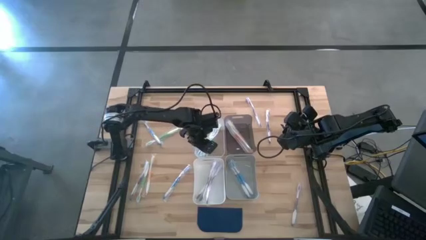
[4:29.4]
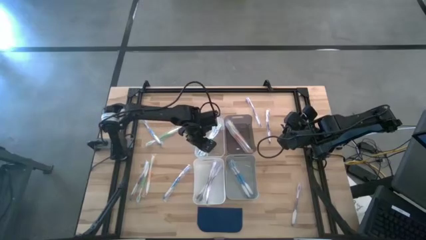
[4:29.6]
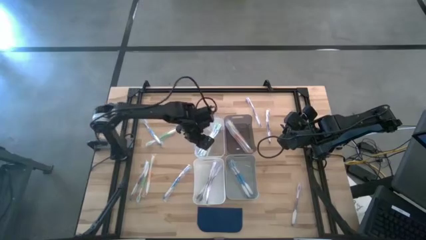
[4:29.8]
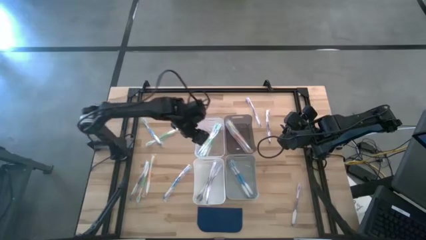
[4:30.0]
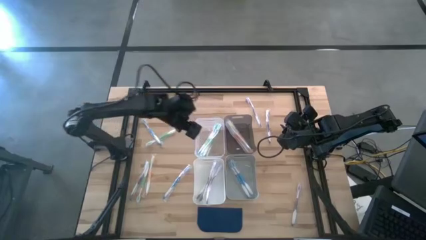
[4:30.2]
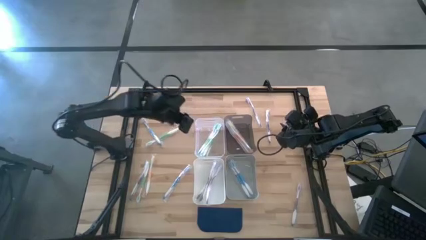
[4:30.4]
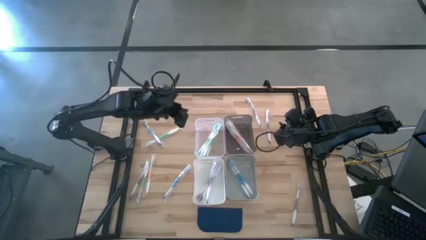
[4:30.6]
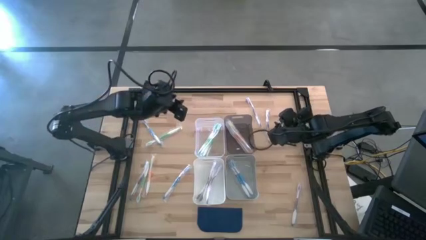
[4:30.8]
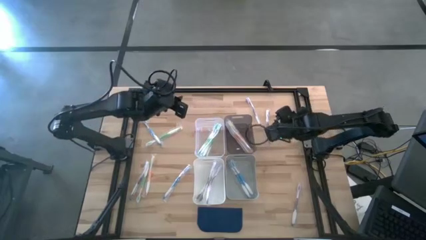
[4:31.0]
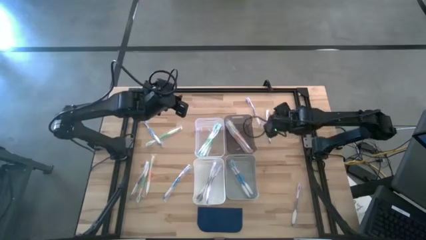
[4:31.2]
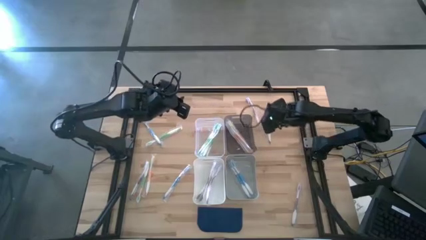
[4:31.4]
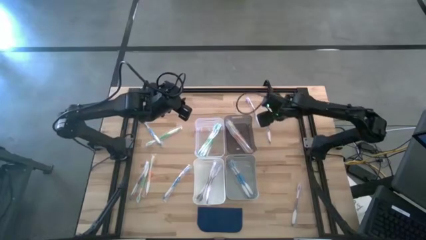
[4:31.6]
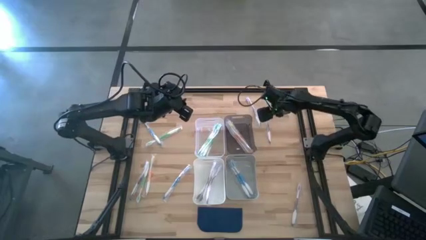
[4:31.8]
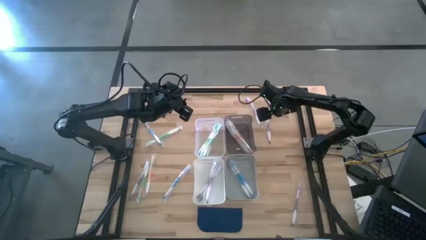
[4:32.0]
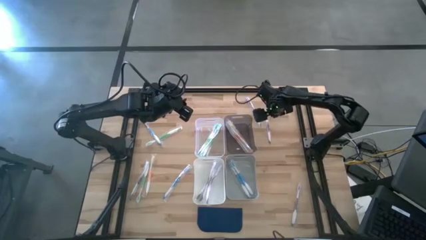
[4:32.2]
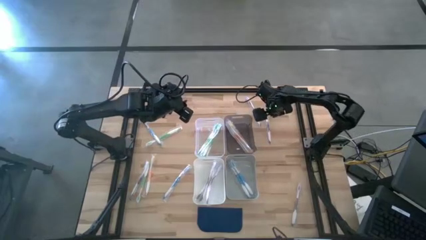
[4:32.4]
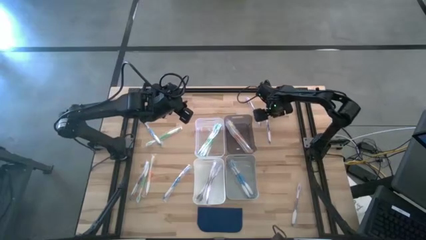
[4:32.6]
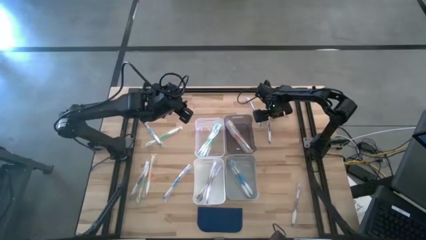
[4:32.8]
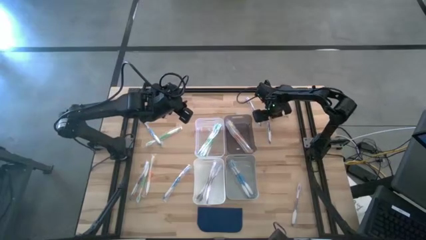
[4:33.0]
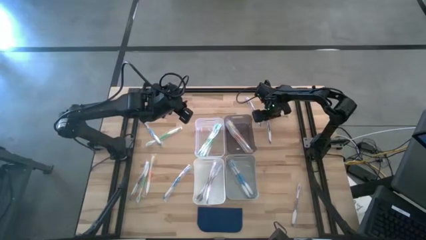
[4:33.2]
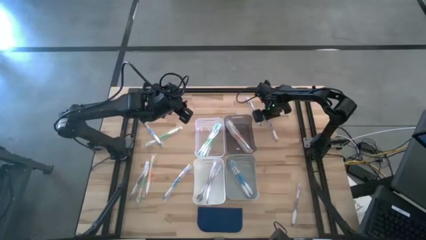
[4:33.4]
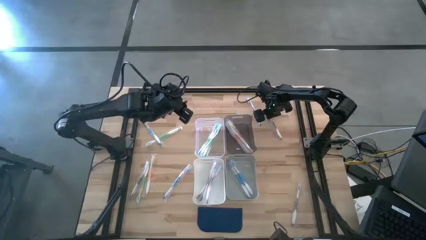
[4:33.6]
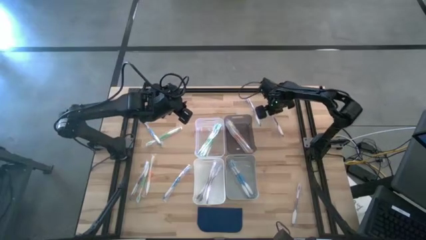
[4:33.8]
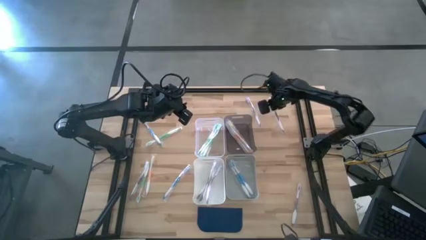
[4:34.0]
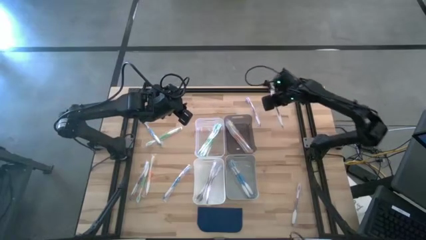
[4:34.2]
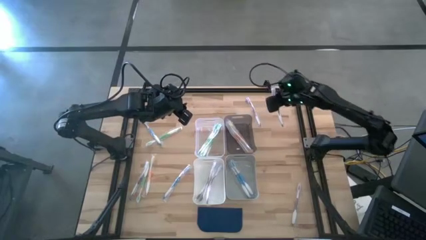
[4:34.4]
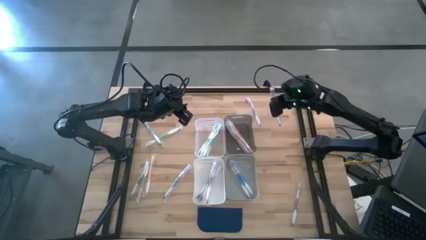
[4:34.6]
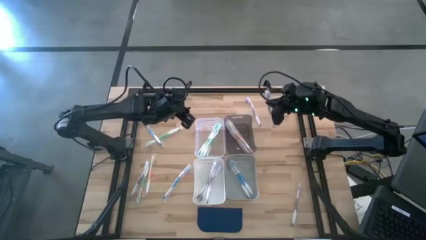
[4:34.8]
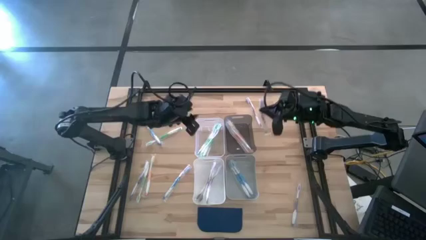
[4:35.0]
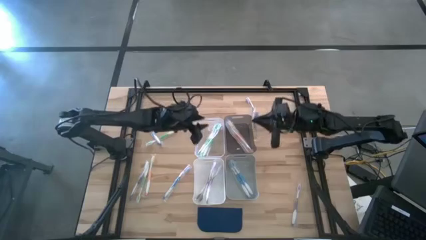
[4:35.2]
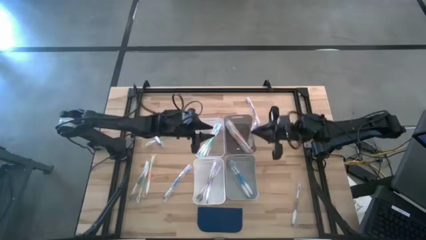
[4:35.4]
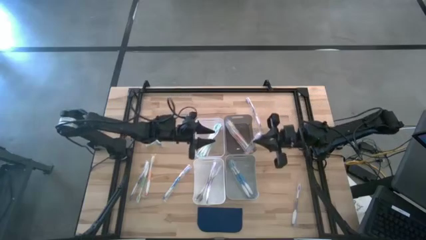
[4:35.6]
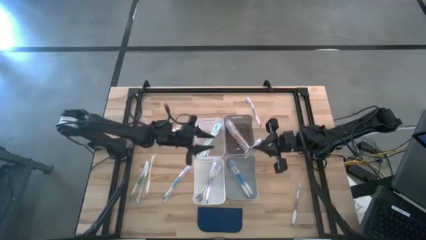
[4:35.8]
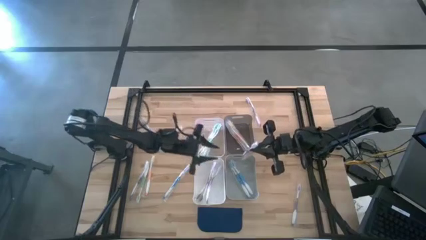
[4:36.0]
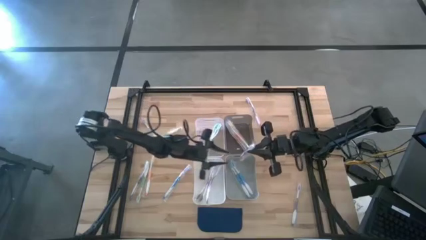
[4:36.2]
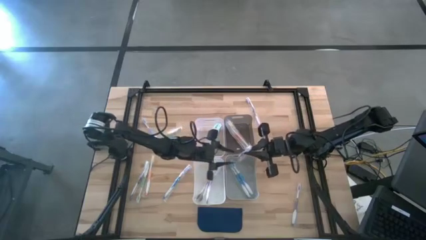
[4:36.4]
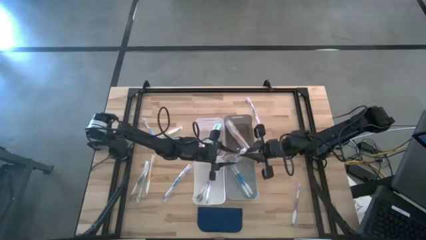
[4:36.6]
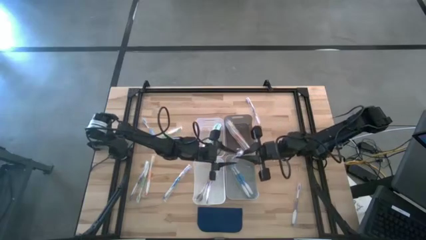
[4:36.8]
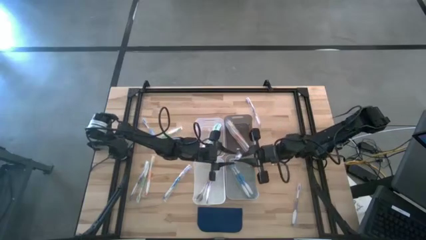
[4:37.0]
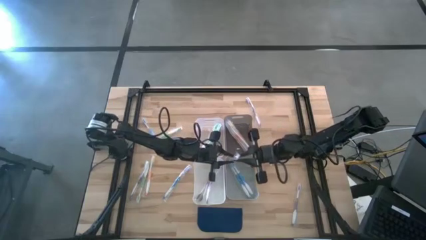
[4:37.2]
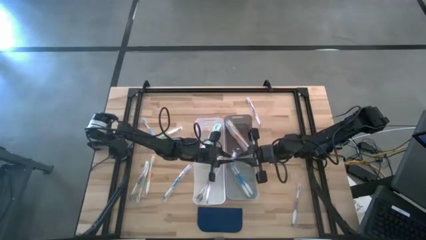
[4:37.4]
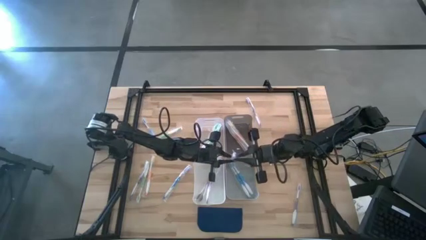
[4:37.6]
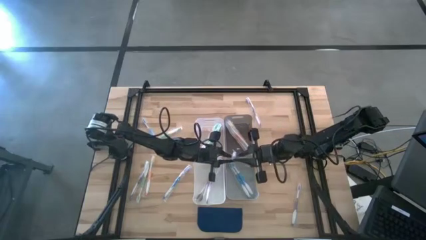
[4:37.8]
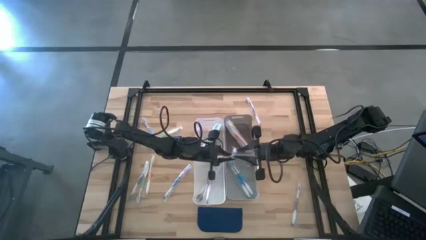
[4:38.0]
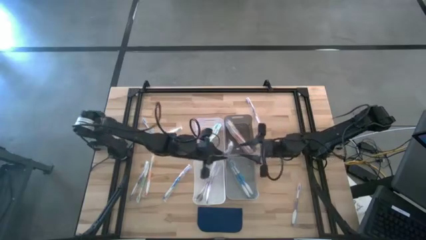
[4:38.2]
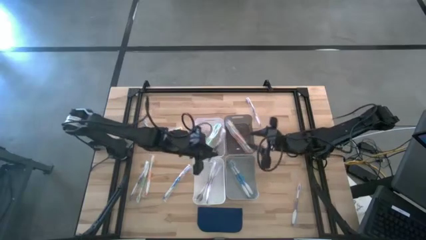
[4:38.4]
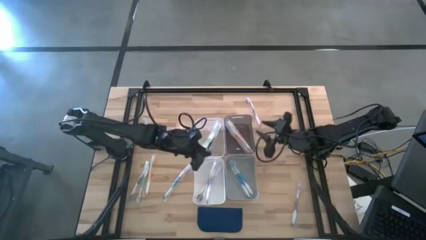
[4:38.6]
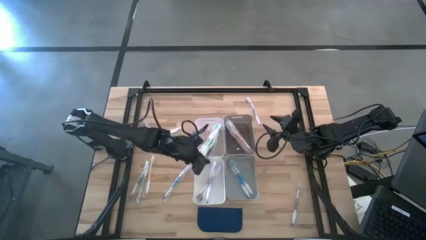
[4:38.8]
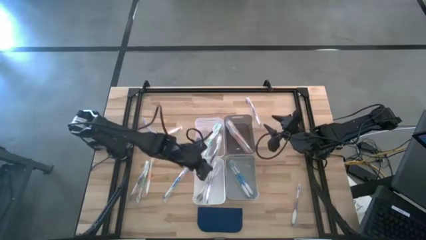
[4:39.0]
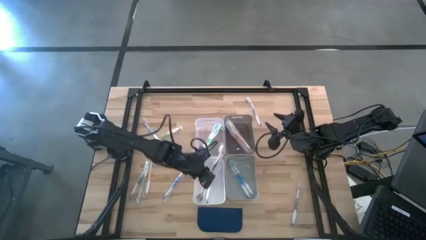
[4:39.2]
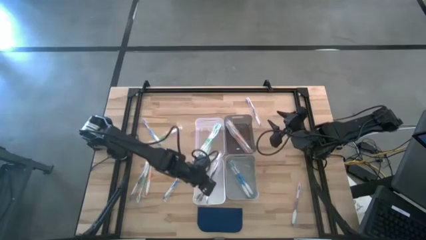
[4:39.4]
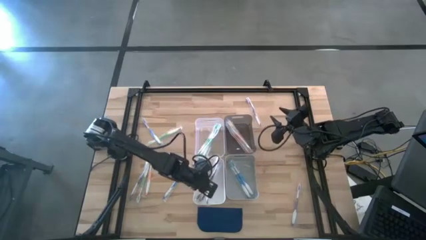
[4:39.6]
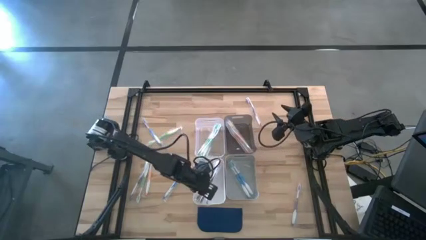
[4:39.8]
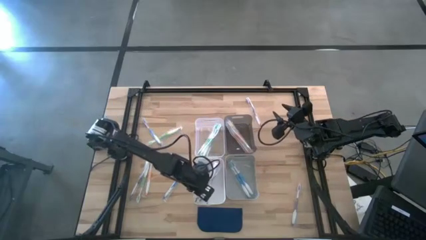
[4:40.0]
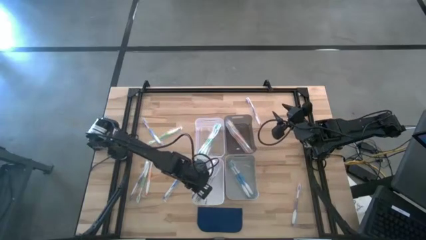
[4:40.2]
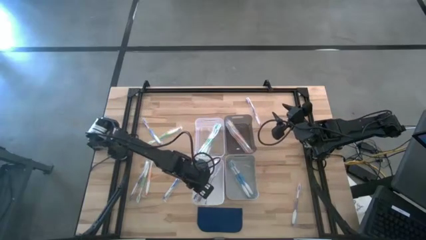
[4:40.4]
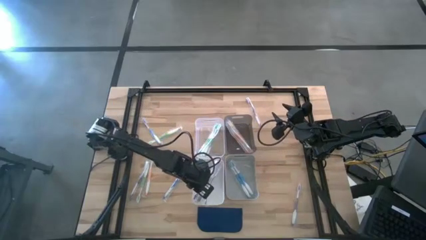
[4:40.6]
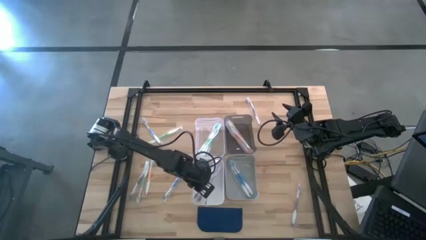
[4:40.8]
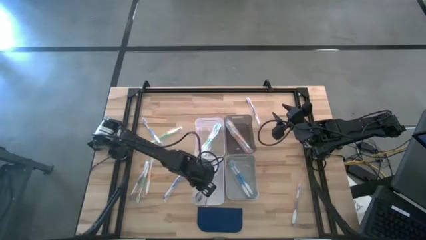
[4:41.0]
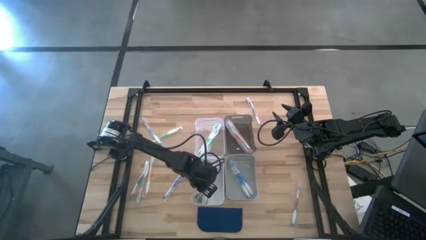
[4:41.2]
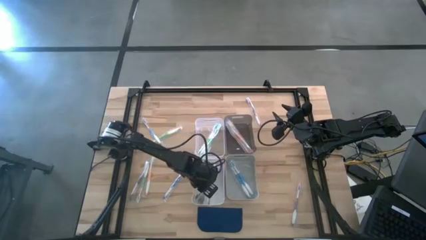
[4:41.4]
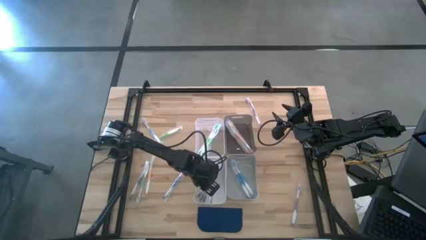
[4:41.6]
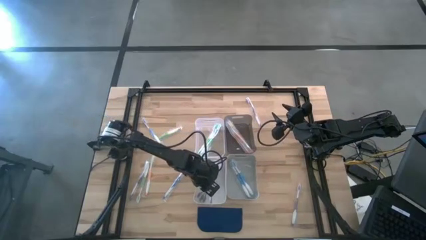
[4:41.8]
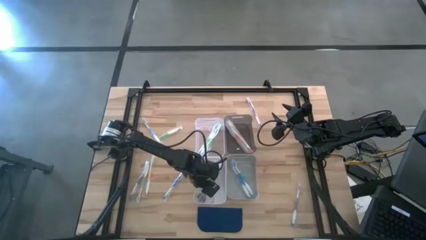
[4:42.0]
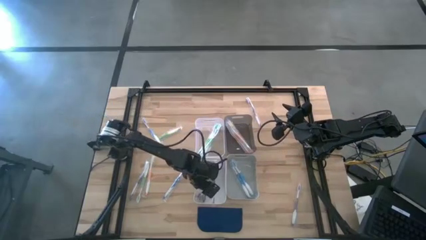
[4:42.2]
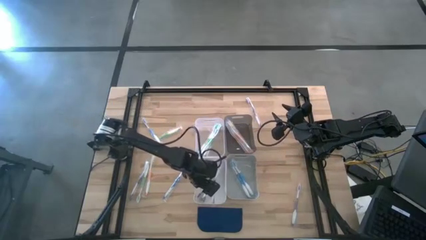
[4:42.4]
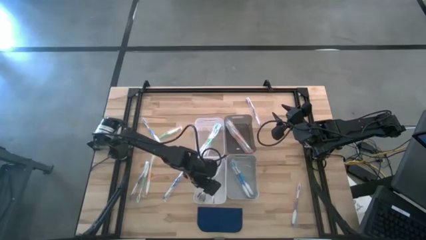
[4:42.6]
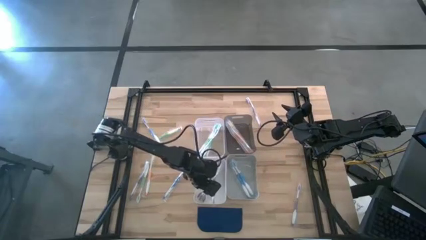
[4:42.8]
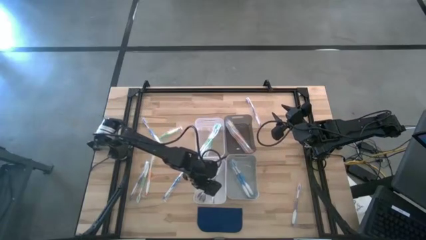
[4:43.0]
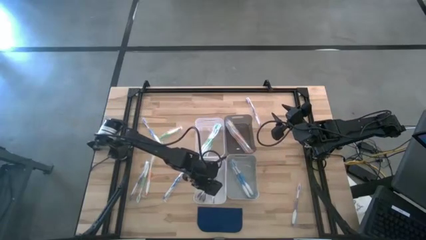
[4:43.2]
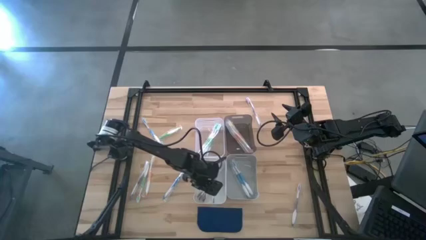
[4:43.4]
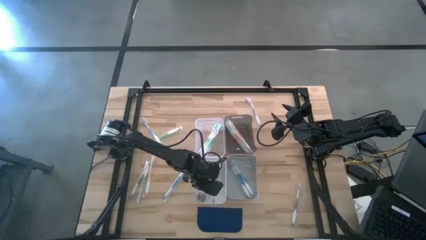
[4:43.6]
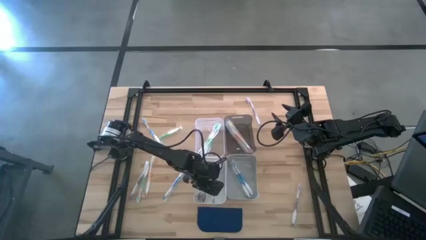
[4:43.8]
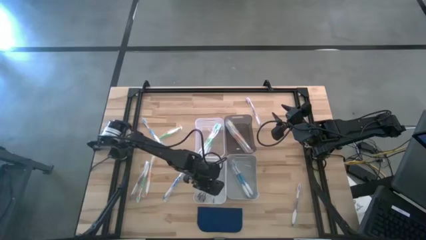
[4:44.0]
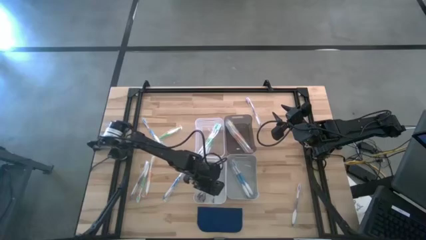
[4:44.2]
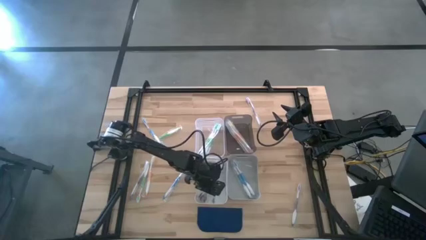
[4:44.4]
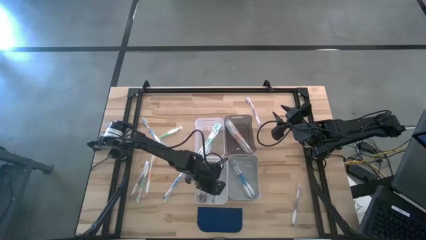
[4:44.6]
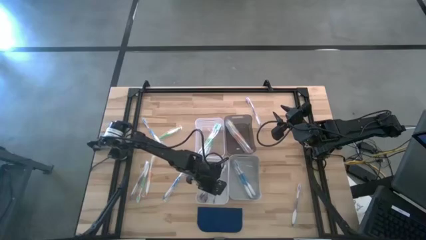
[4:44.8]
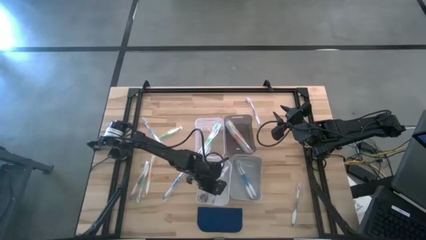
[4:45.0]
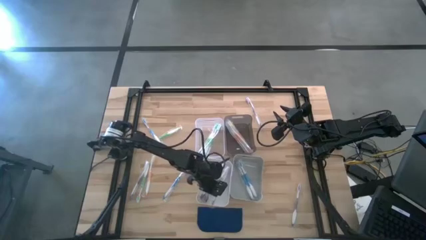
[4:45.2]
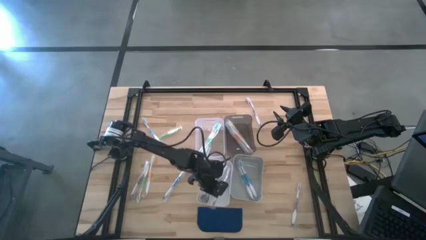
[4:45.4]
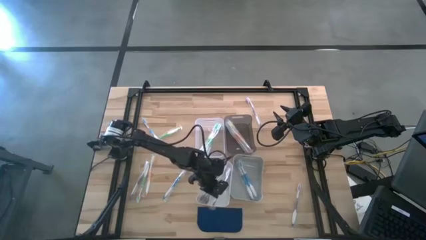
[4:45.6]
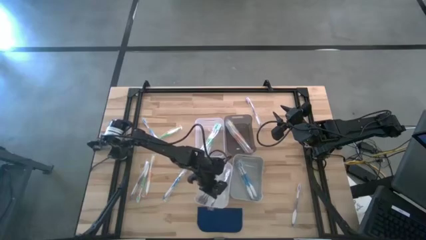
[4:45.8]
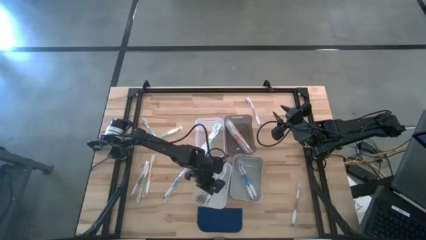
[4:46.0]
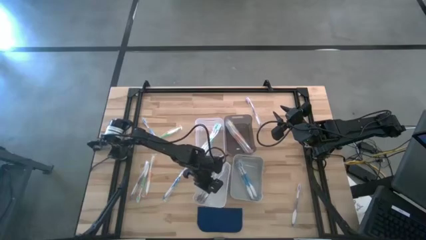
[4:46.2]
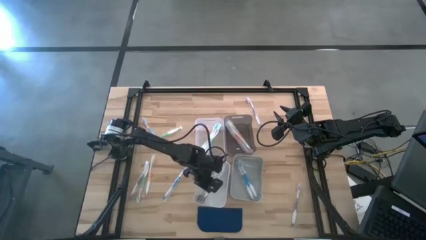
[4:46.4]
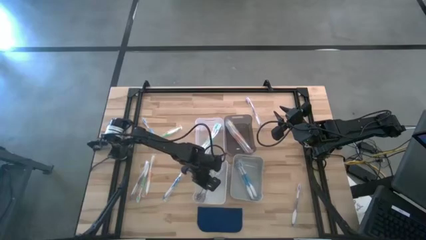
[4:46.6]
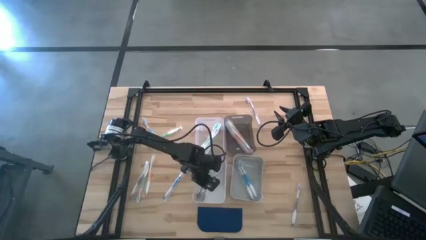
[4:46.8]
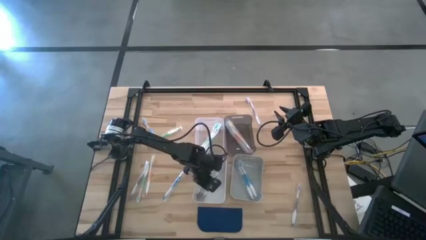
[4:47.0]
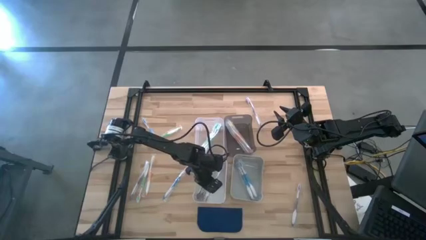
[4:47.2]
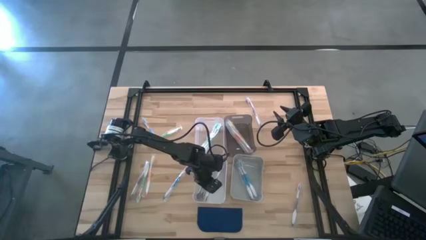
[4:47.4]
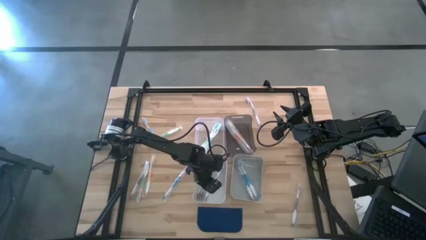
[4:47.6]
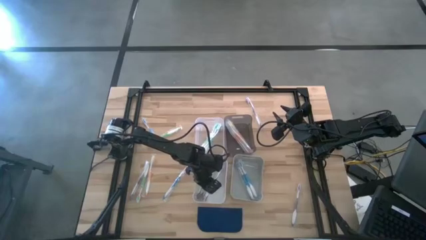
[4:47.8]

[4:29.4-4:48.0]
Task: Pick & Place Toothbrushes
Put the violet toothbrush into the white bin
